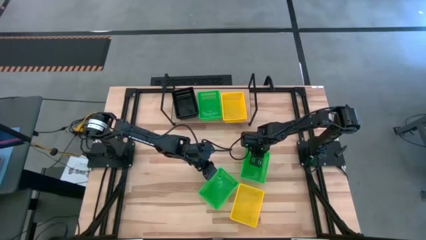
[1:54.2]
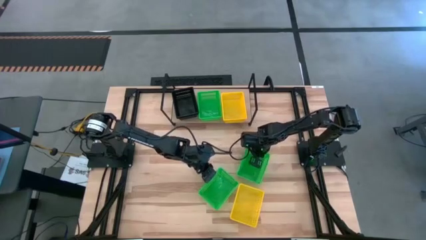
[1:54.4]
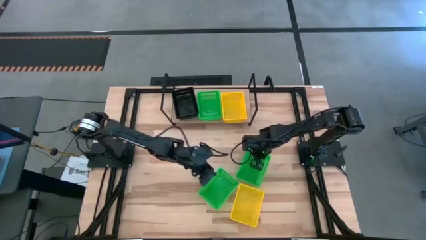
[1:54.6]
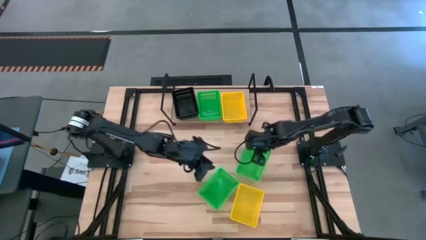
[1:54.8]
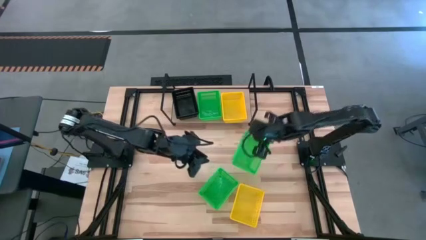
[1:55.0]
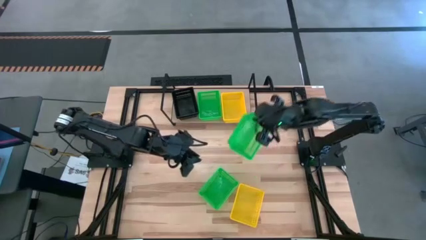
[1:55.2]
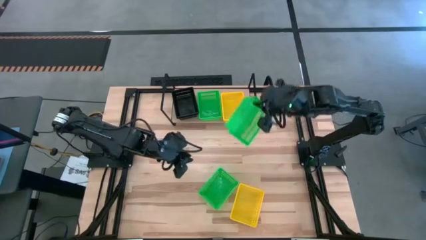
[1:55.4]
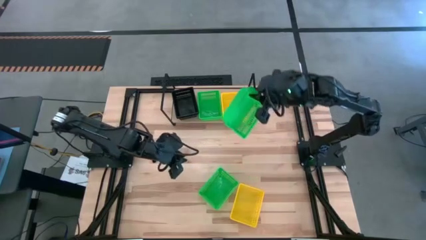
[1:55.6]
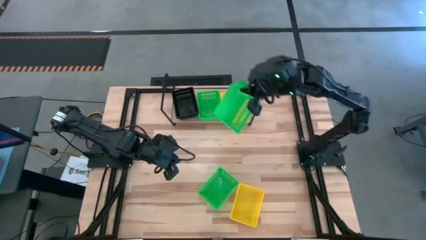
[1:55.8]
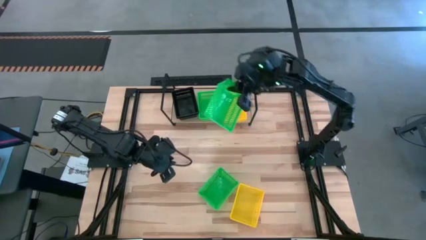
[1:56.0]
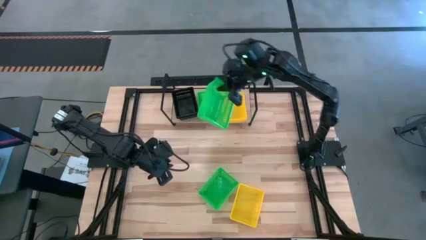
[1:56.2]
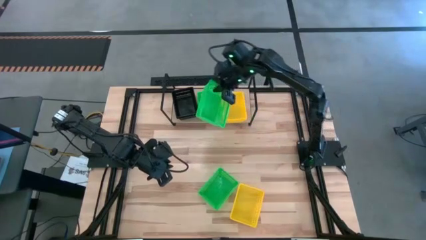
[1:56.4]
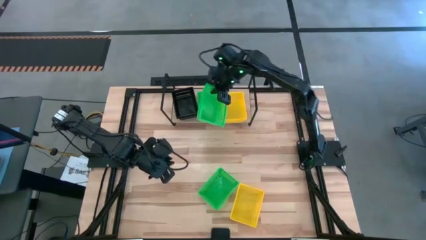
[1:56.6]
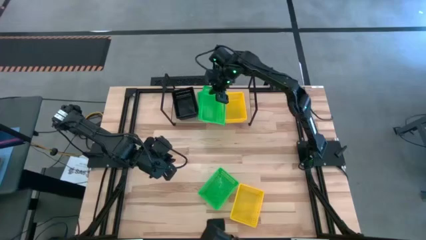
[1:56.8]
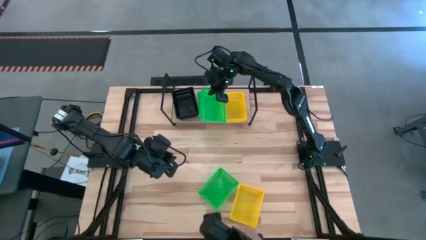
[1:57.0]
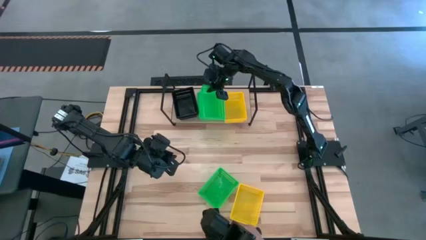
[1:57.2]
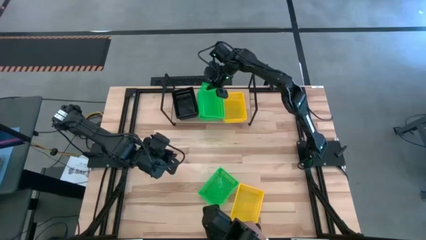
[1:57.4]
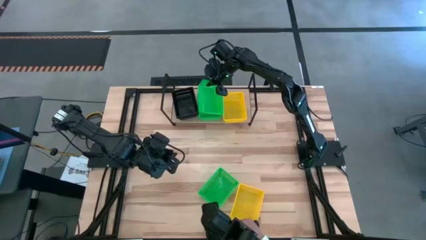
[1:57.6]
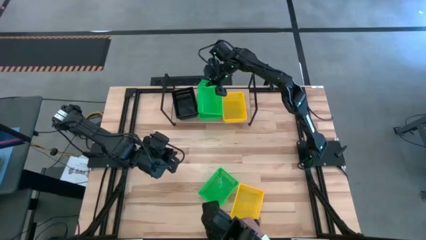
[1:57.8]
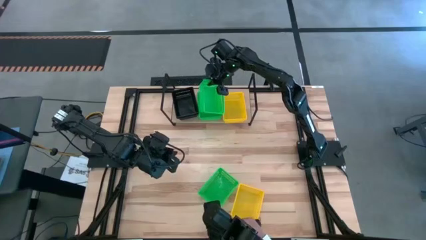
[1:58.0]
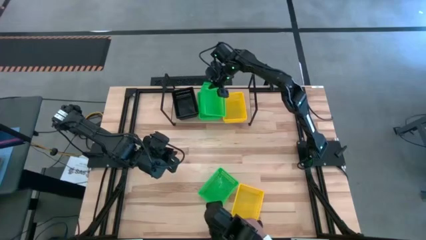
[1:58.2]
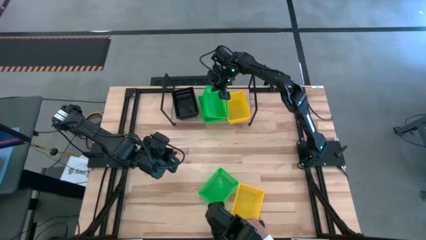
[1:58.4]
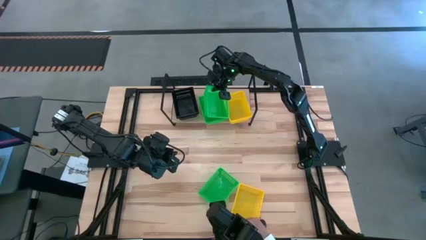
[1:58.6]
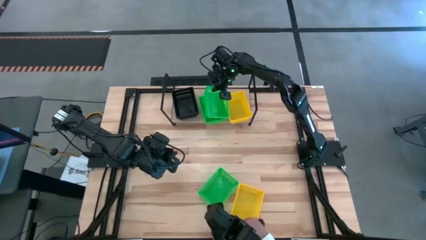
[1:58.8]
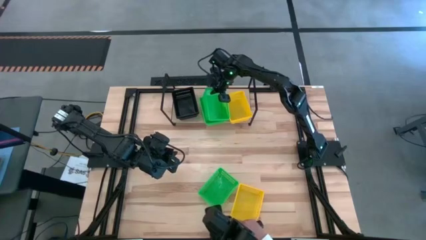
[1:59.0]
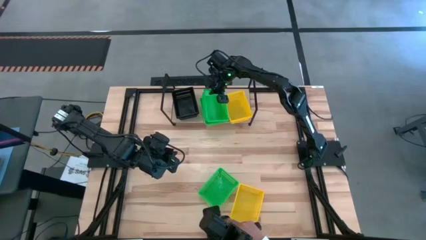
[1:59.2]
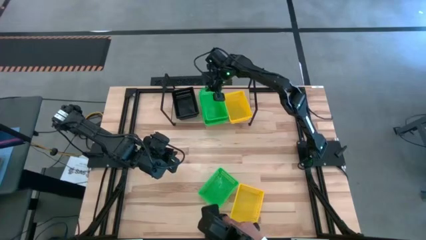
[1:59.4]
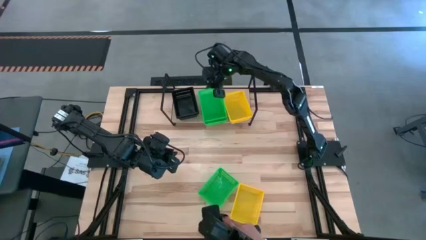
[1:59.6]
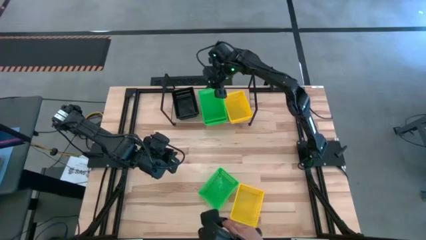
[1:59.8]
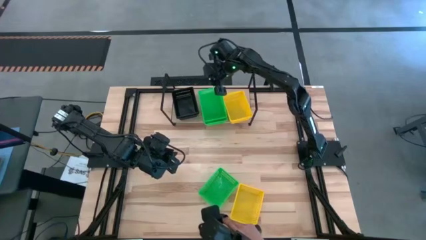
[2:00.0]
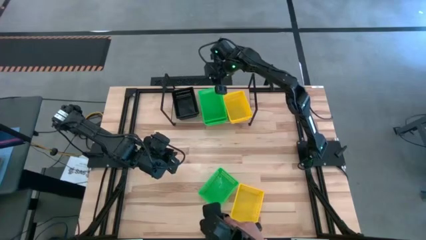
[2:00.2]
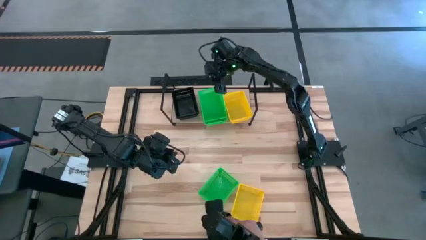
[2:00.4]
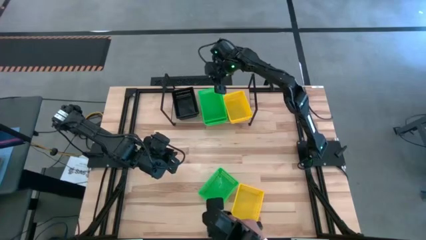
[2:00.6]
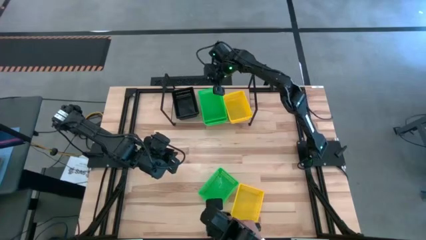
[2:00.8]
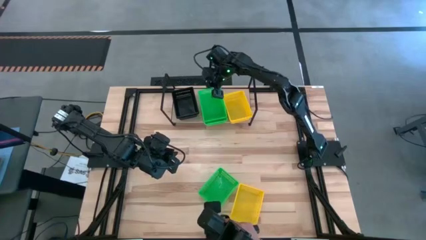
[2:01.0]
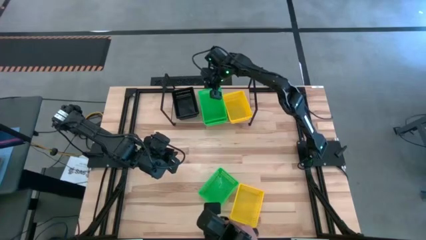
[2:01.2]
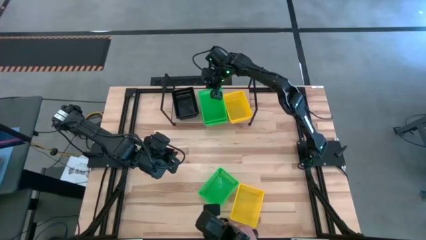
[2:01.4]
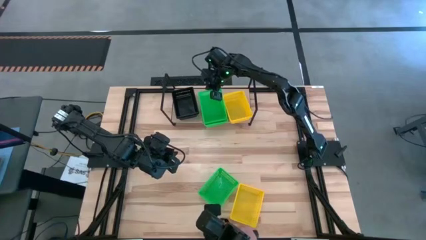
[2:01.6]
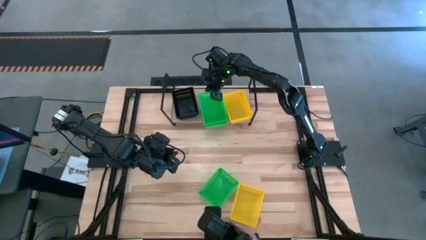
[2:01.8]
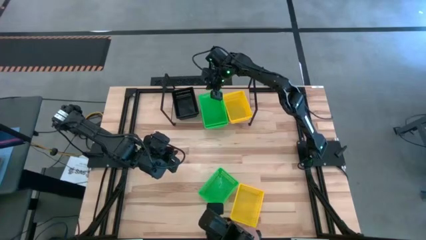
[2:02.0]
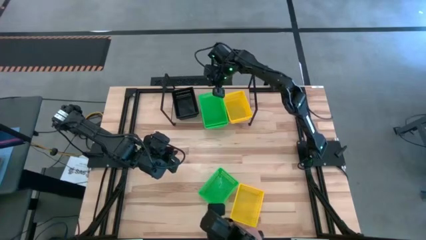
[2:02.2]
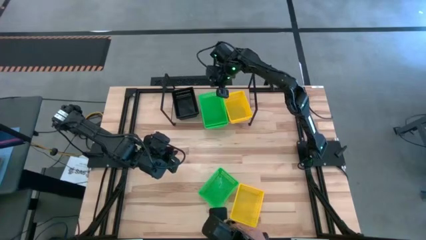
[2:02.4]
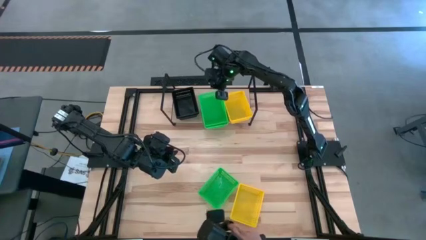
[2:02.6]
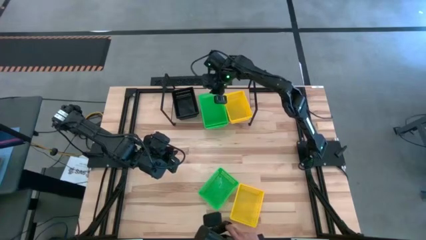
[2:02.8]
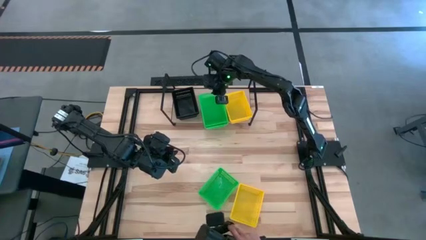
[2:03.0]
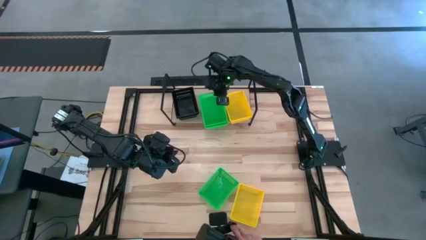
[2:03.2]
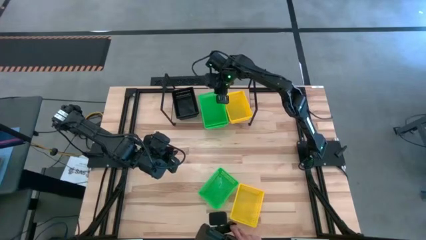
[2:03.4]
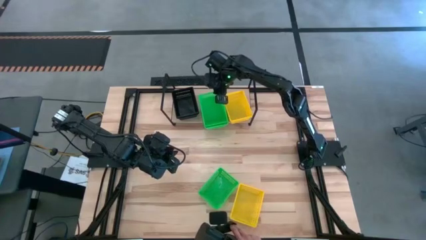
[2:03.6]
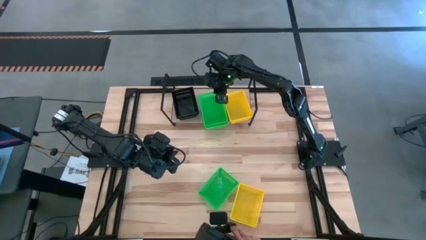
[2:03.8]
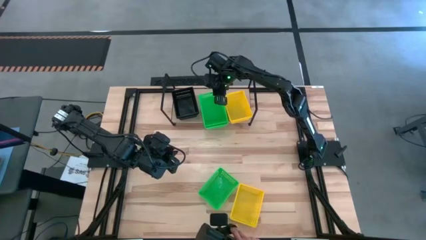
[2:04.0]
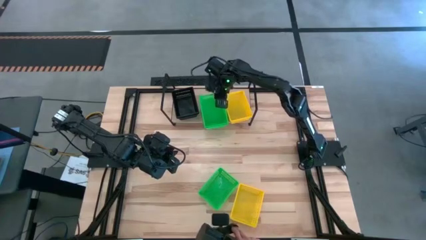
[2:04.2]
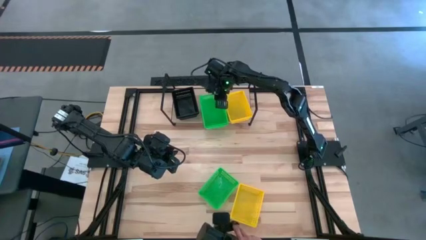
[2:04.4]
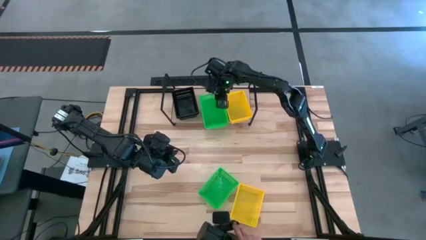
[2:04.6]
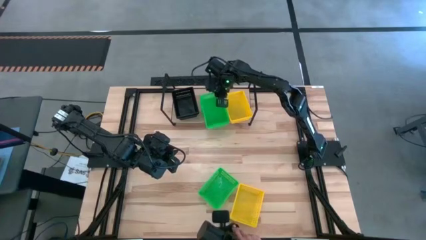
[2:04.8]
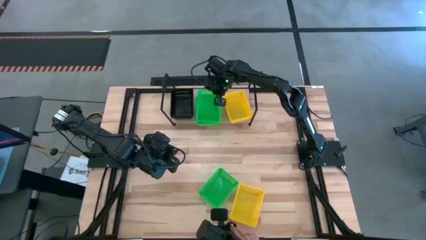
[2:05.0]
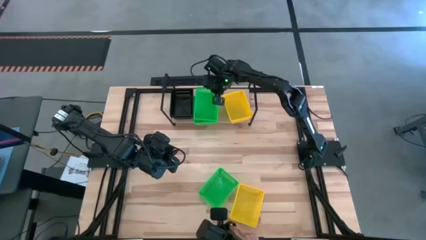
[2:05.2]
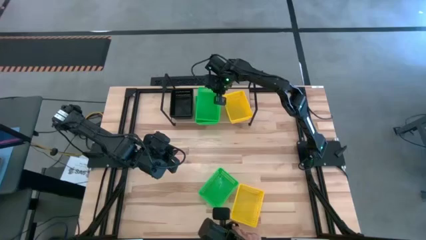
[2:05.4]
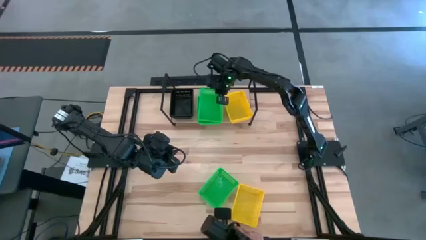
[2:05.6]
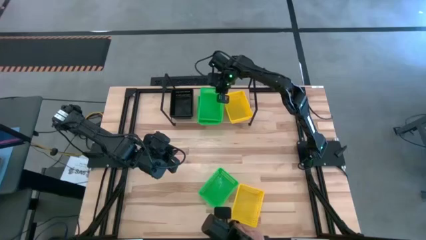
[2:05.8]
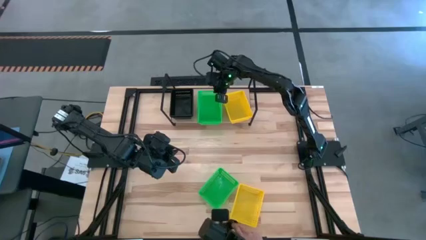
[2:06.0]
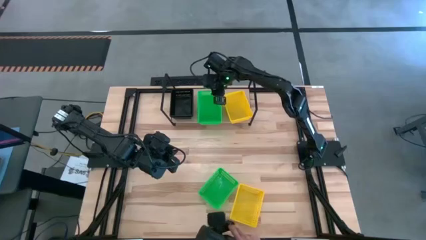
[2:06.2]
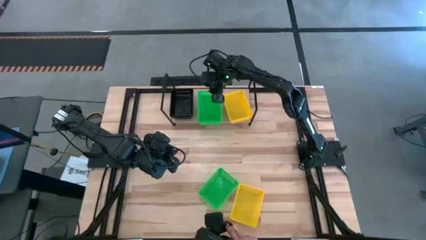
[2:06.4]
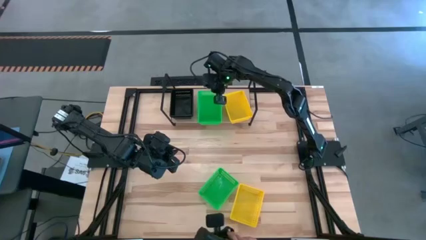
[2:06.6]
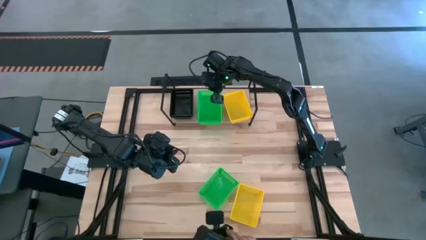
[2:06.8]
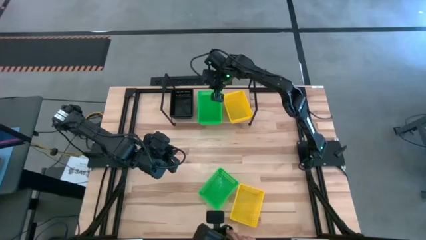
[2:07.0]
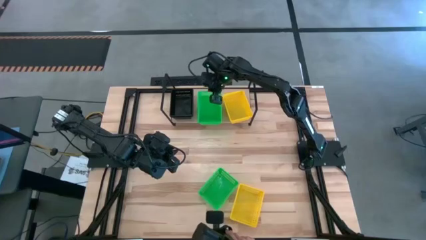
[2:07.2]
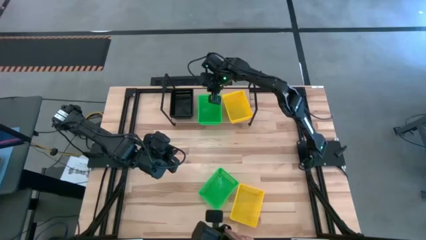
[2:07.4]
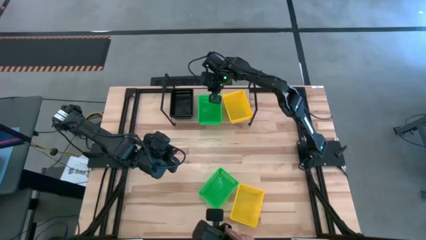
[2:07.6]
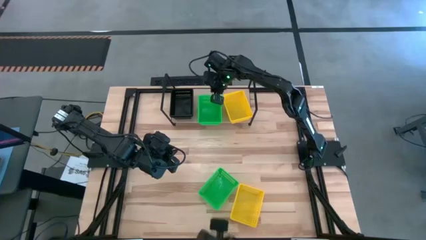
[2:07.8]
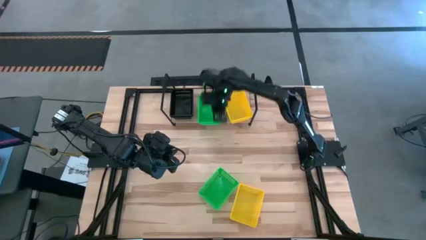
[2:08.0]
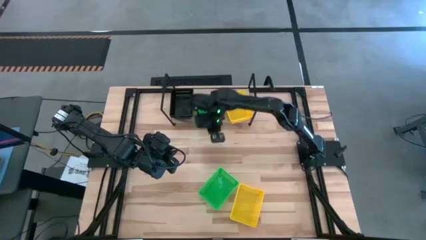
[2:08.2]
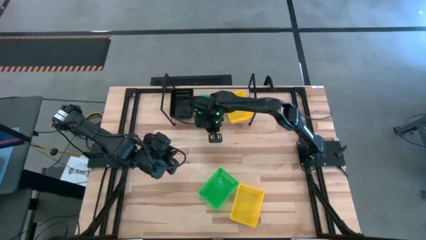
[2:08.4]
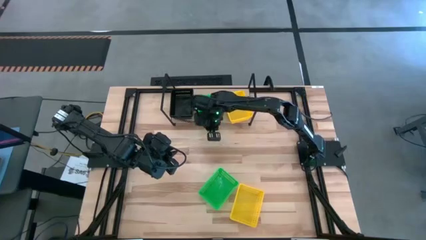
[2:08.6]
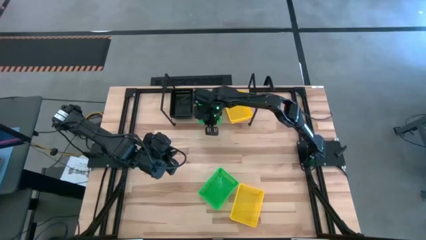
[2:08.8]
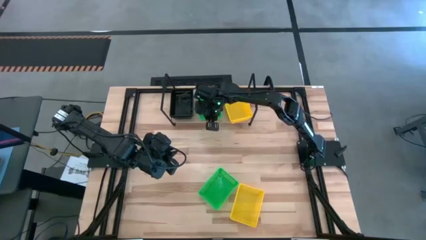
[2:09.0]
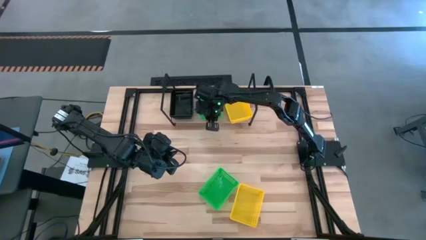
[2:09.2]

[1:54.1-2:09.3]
Task: Stack baskets on shelf by color
Stack the top green bin on top of the green bin on the shelf

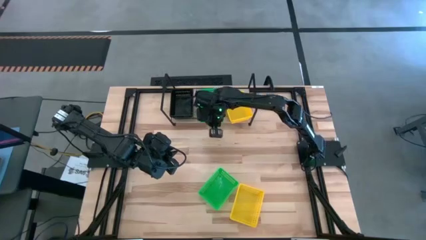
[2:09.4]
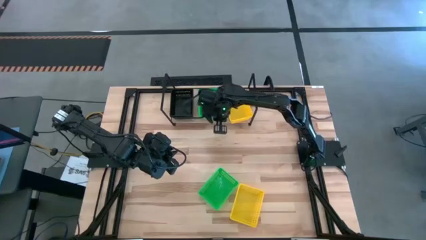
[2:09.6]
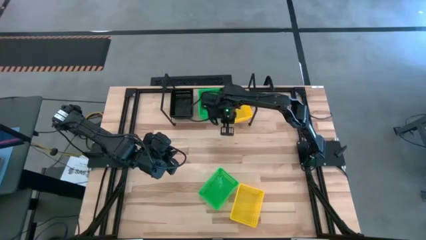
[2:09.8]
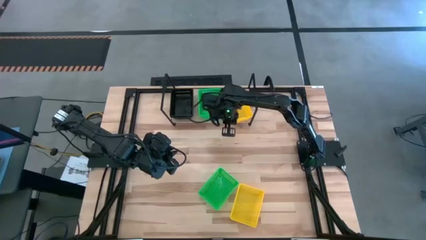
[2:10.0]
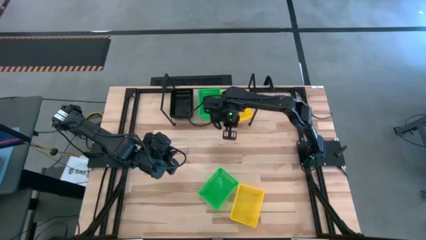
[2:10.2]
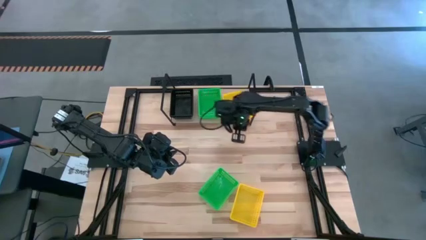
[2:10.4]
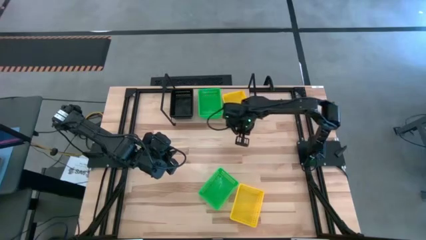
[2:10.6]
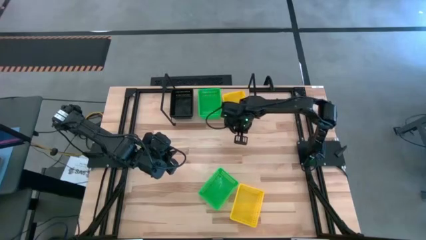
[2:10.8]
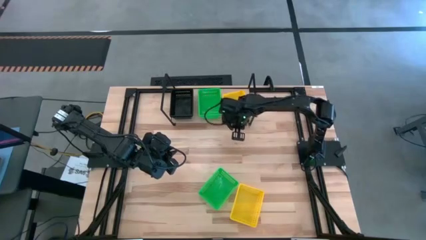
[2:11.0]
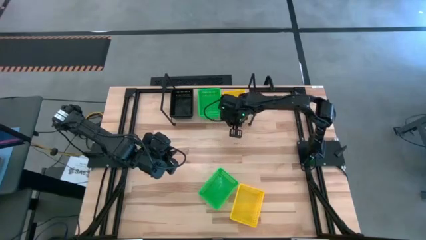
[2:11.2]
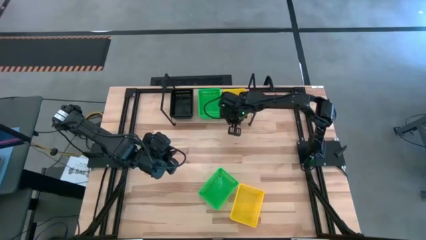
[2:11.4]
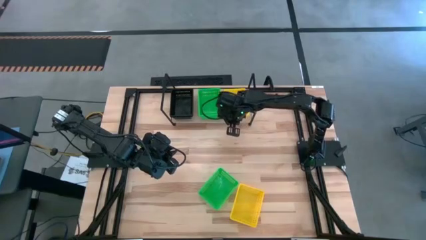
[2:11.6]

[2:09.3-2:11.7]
Adjust the stacked yellow bins on the shelf
